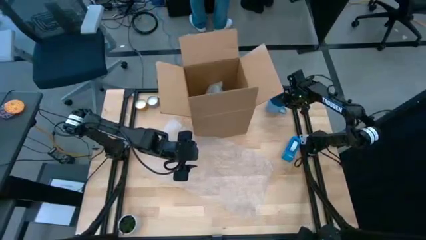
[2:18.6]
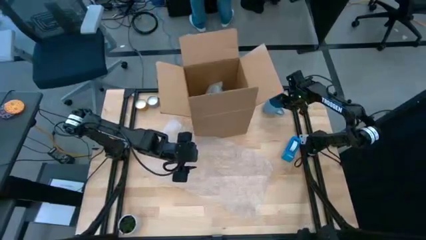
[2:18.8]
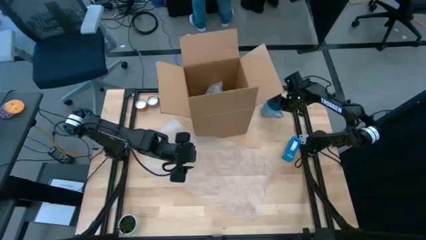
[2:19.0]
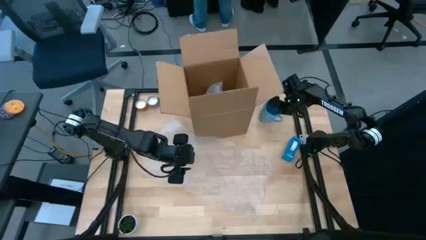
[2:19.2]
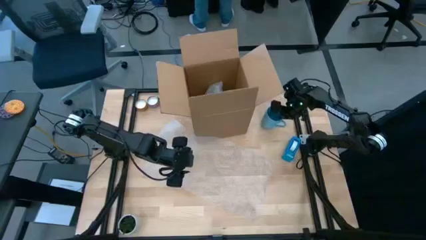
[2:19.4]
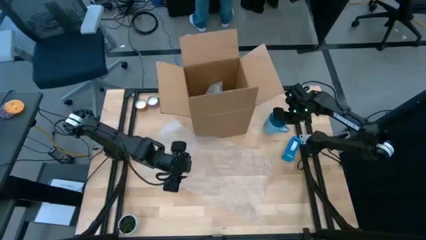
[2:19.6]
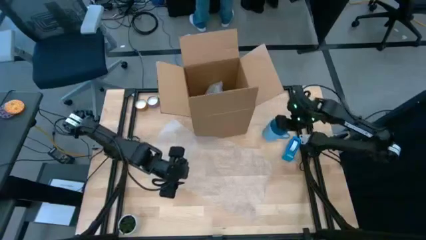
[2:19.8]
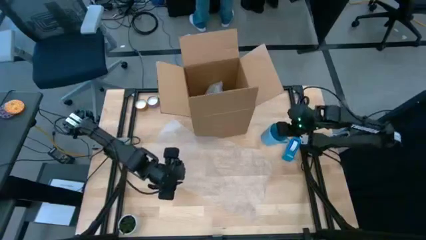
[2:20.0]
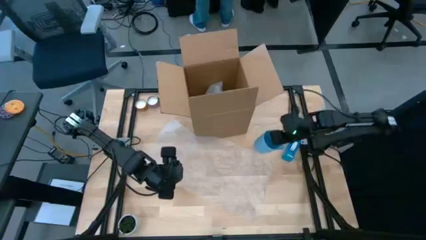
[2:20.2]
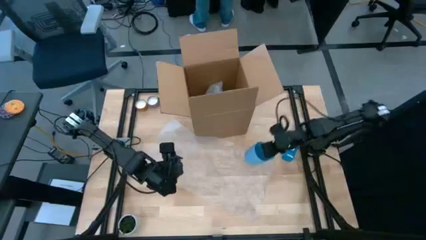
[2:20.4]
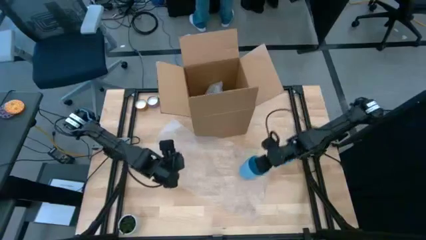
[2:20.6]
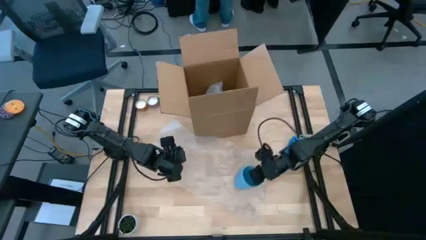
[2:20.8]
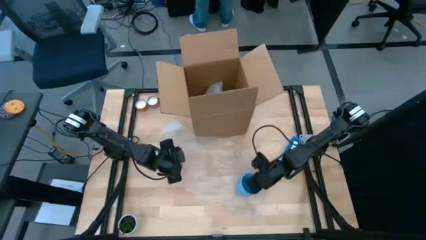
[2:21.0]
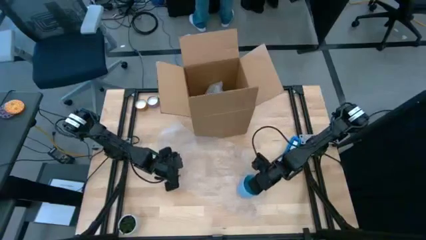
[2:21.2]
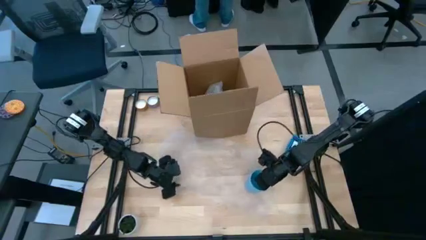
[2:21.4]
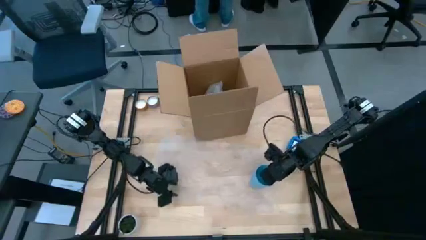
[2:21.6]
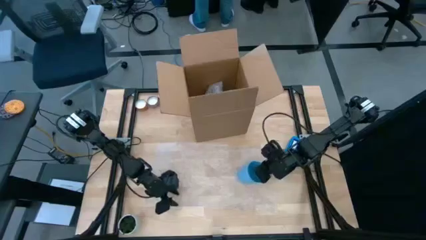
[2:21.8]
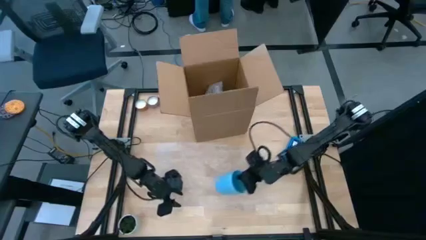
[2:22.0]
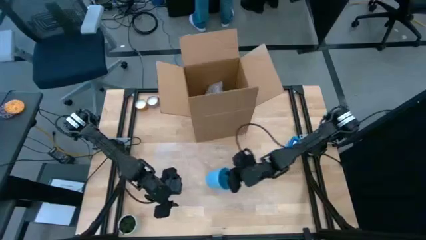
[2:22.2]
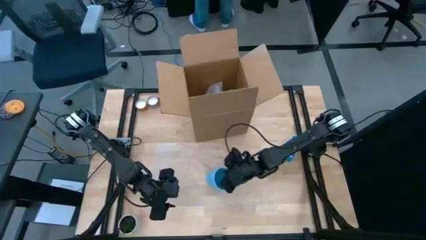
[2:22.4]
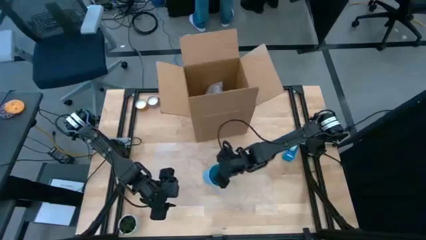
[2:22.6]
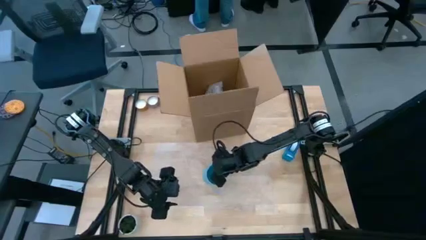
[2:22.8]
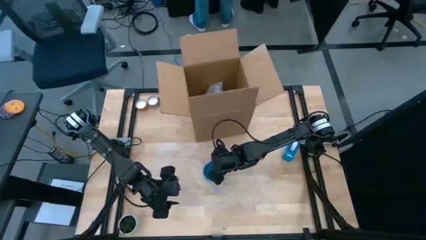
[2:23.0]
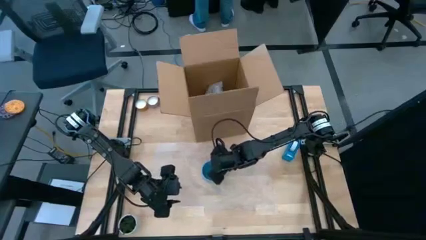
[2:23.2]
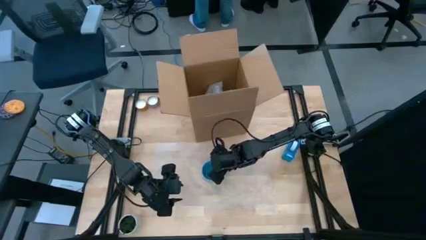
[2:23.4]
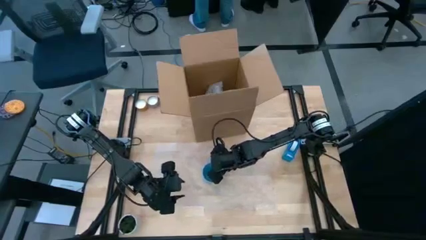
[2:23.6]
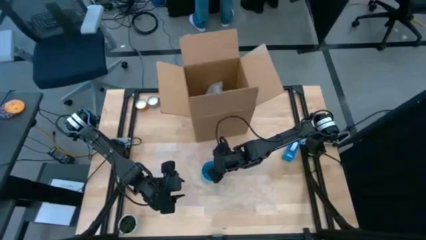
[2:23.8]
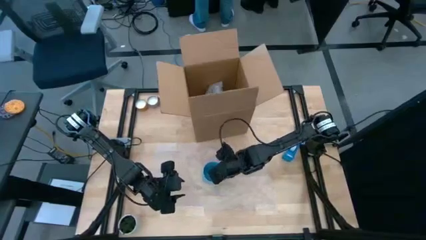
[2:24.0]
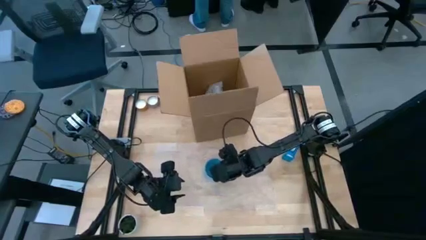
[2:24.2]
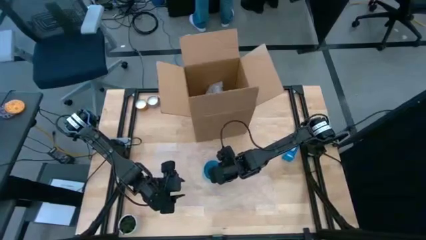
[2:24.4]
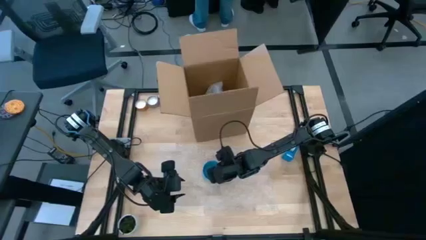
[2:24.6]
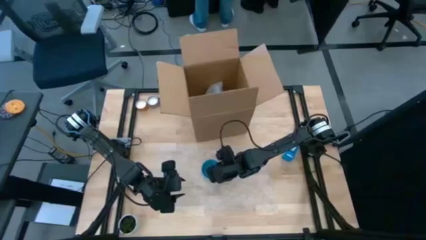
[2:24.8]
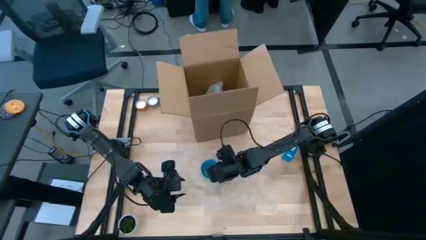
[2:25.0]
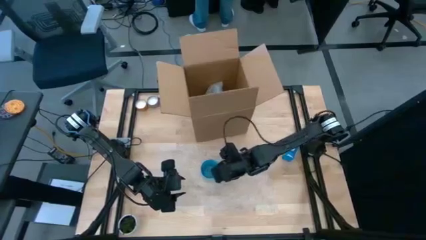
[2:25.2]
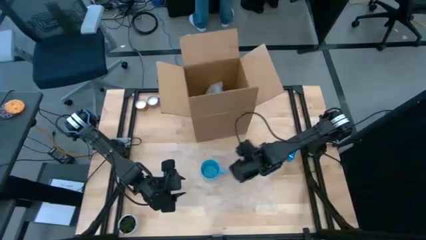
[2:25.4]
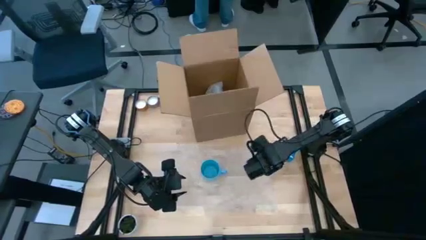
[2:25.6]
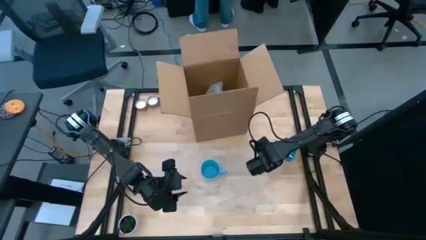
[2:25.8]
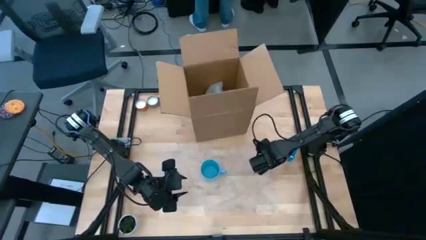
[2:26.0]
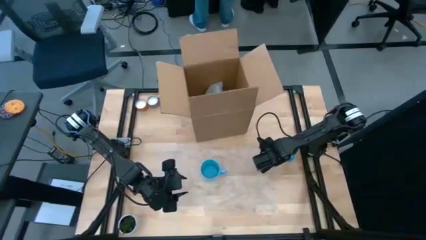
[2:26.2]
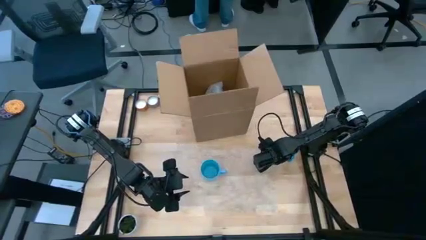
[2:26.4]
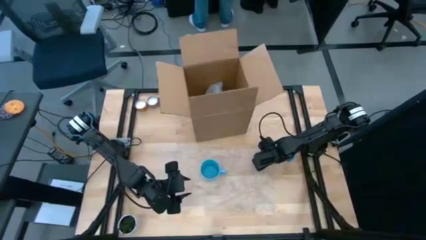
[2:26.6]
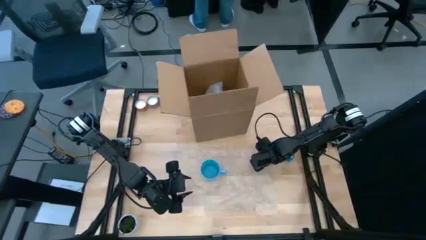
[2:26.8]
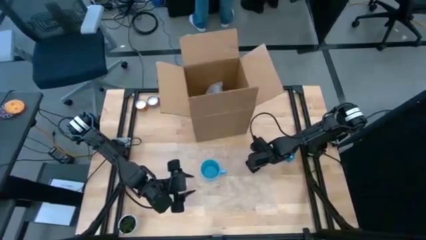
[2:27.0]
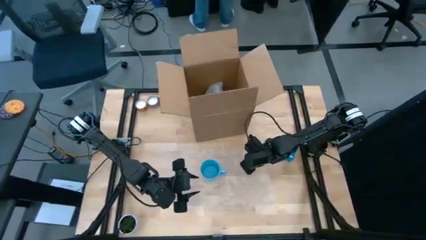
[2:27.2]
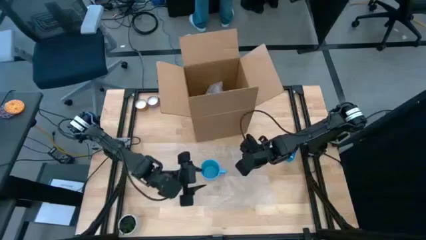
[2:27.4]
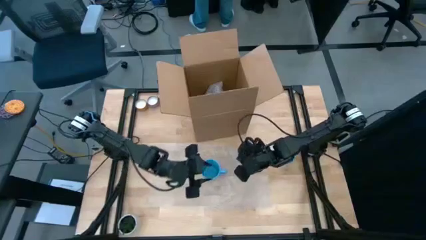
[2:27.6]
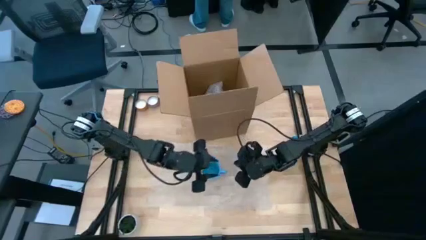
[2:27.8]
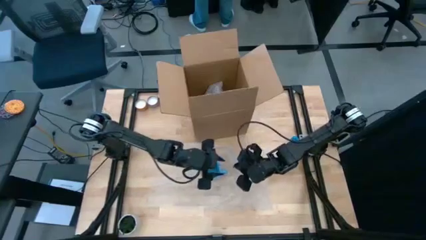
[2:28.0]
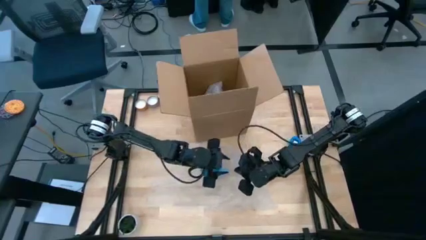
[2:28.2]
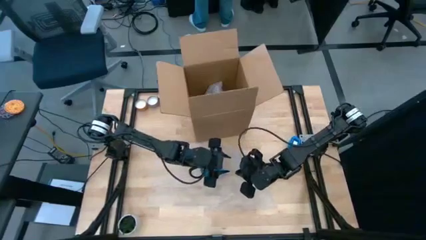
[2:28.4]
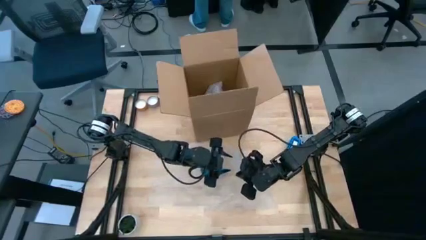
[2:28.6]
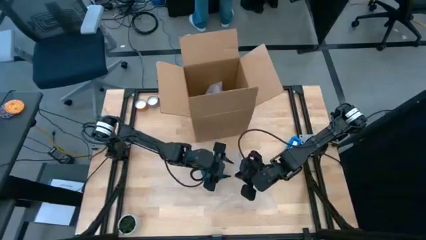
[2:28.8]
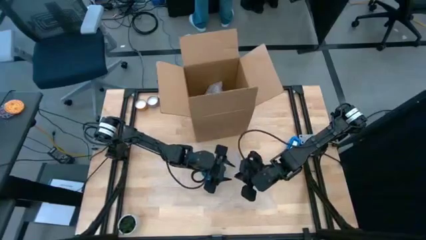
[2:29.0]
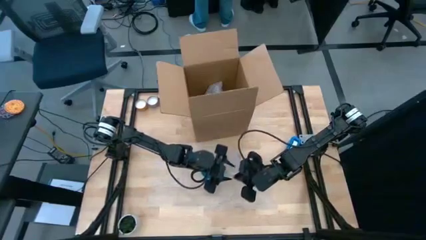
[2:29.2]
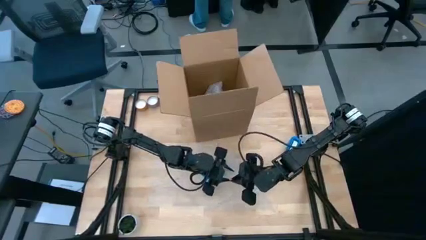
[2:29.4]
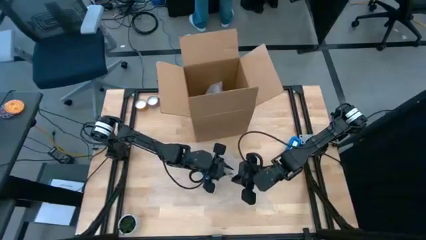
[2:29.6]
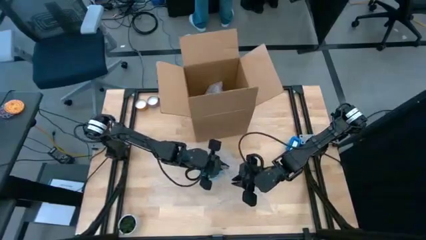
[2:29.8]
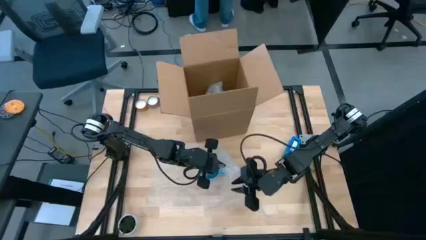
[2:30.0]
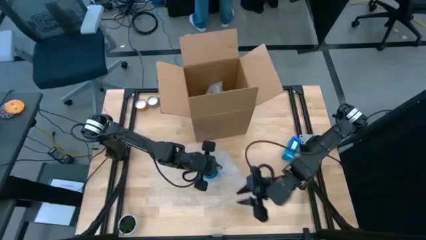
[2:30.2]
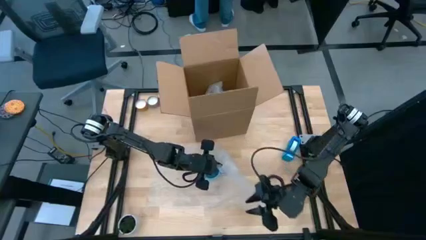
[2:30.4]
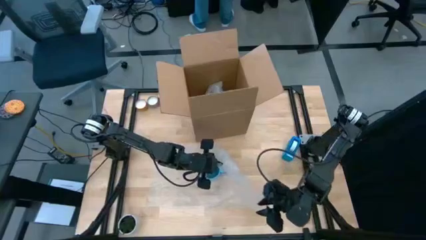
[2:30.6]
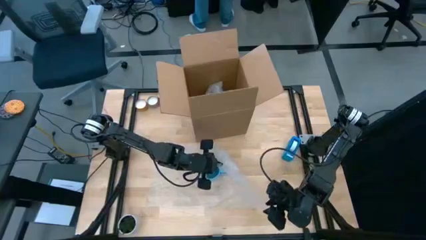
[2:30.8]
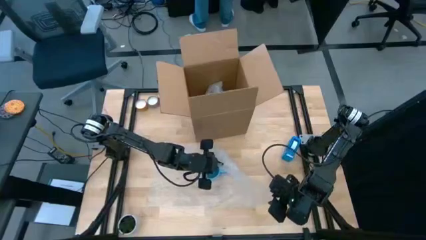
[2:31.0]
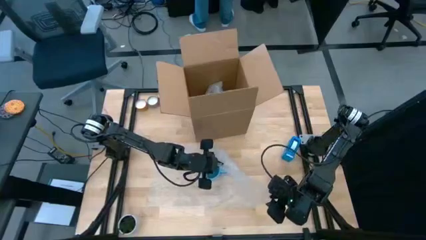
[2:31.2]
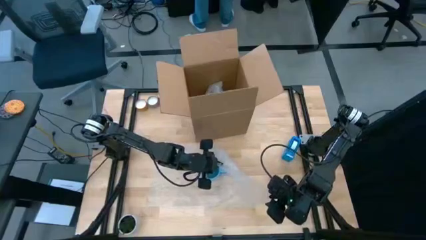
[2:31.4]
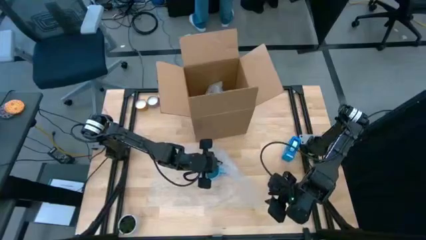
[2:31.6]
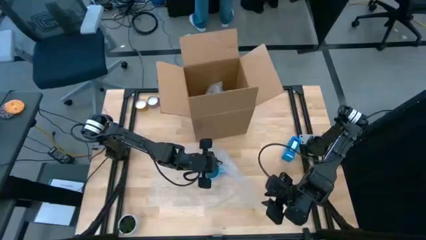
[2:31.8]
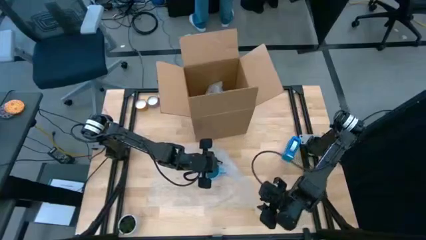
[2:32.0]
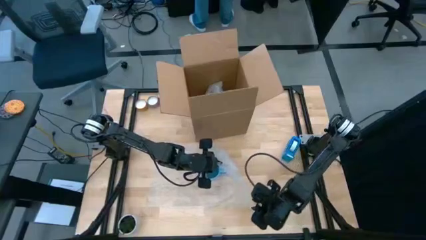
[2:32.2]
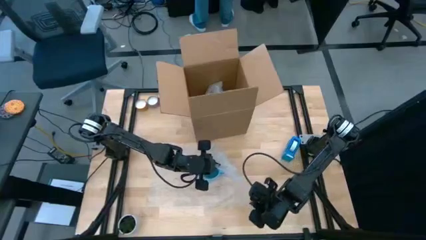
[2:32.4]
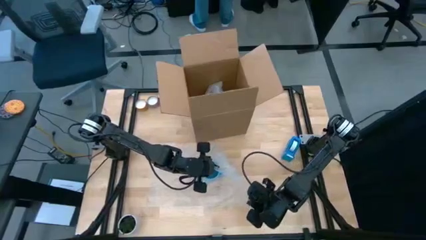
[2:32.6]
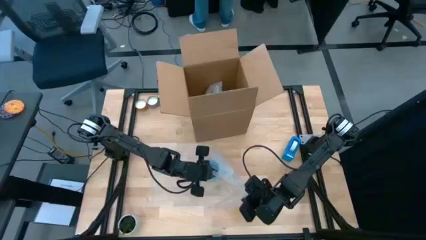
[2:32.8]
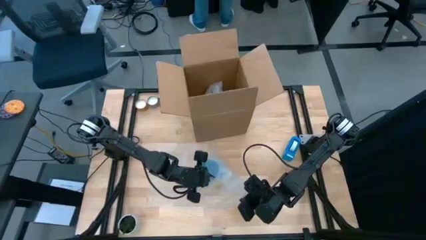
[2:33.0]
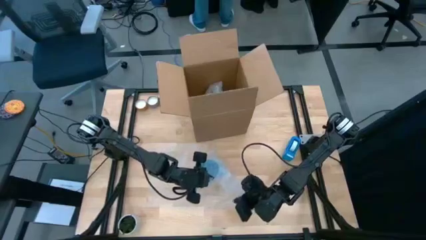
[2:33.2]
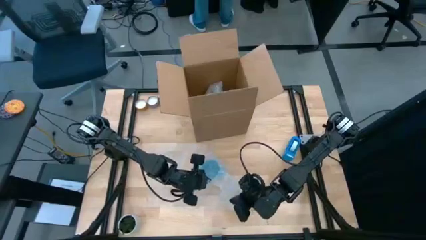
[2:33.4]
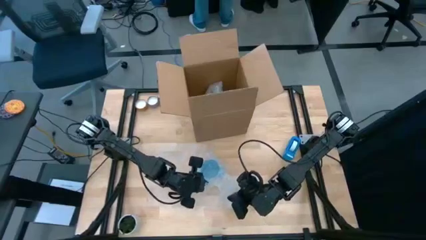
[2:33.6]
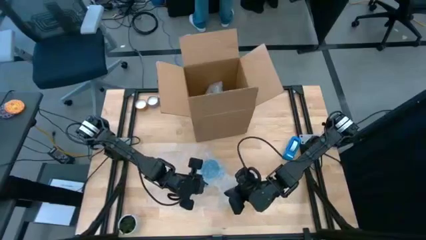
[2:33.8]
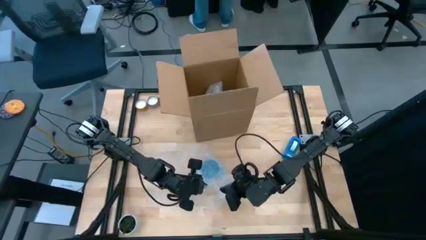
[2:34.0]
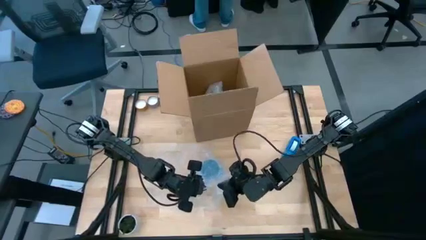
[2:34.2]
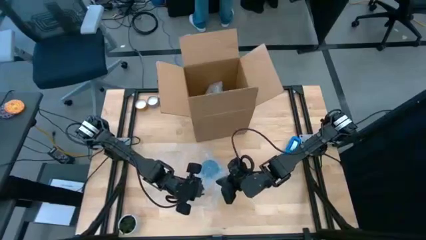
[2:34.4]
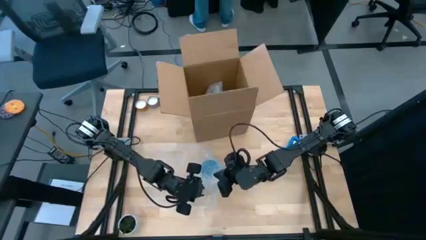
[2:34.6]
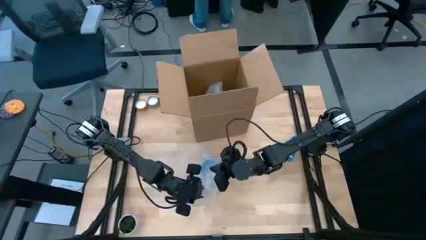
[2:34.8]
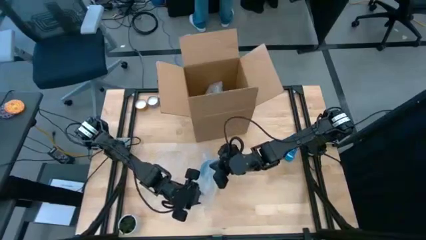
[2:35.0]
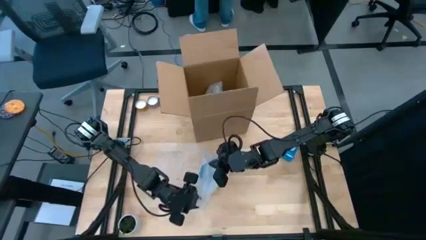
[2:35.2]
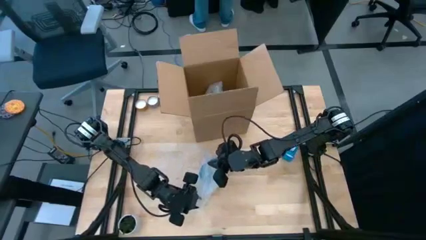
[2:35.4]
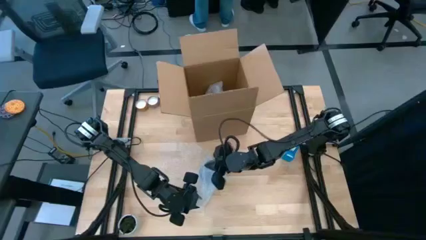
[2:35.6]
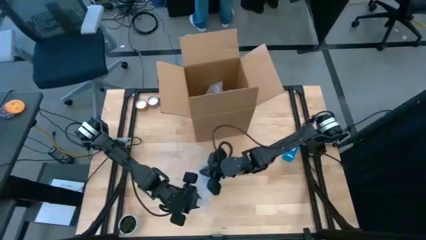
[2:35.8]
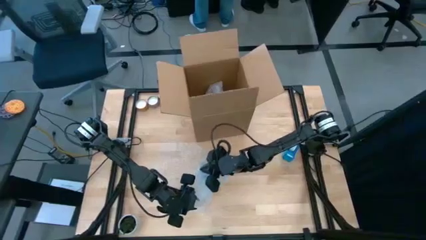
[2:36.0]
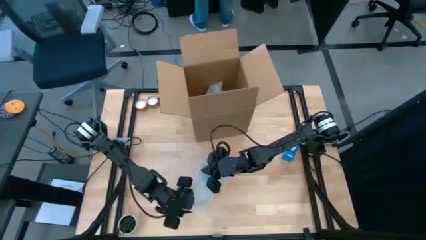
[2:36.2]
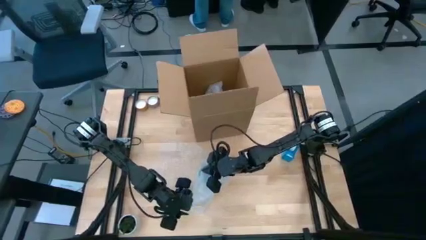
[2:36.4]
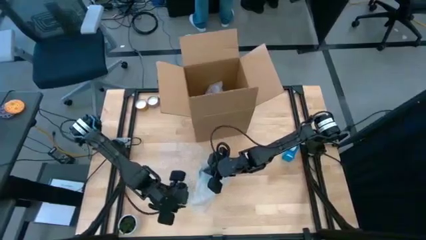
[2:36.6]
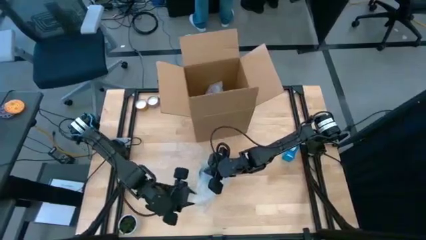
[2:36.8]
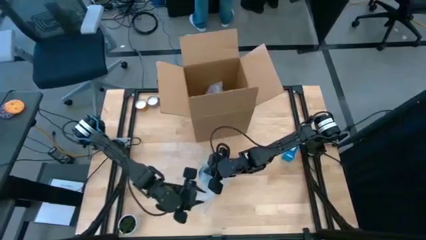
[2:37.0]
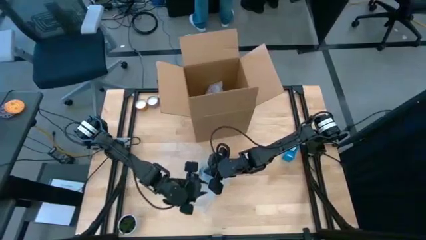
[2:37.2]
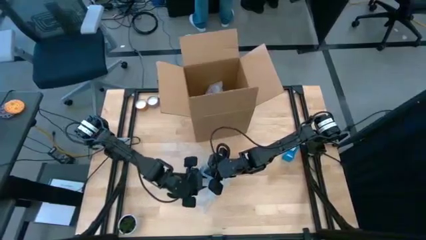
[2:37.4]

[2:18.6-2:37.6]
Task: wrap mug
Wrap the blue cup with bubble wrap
